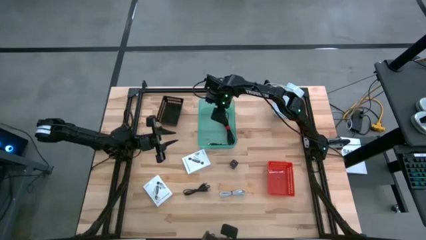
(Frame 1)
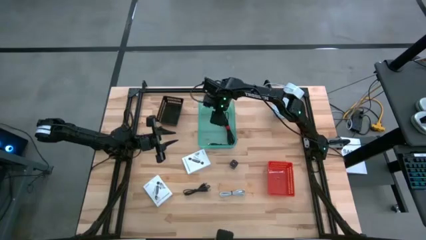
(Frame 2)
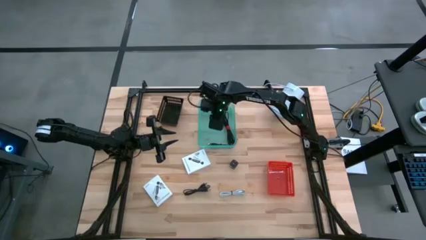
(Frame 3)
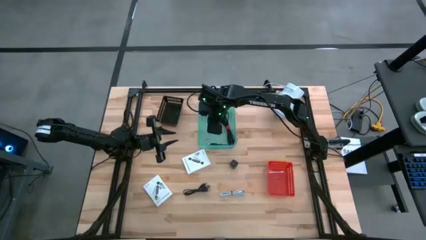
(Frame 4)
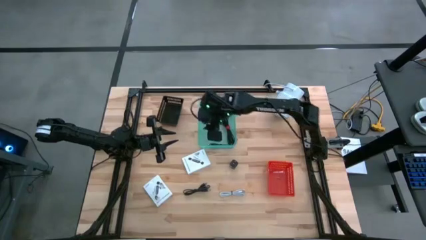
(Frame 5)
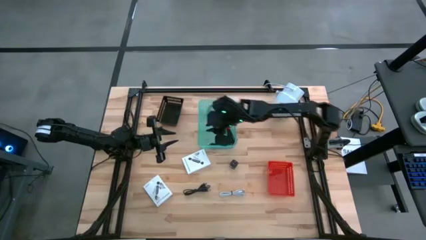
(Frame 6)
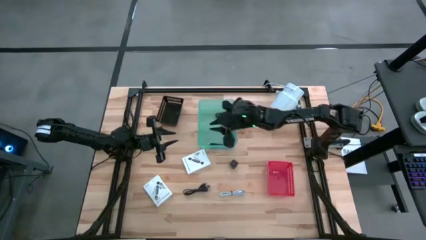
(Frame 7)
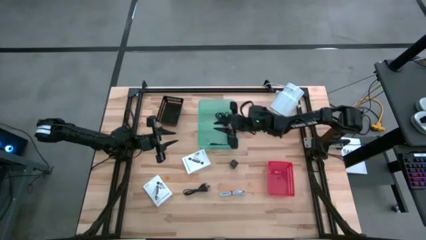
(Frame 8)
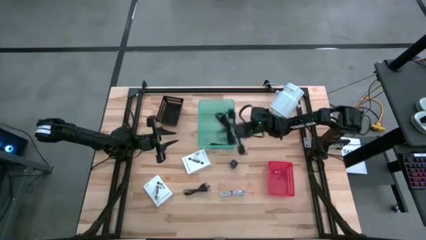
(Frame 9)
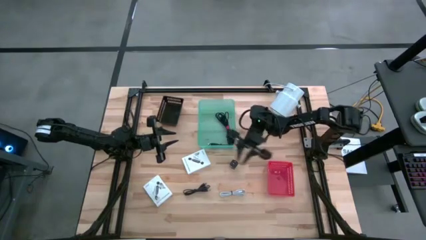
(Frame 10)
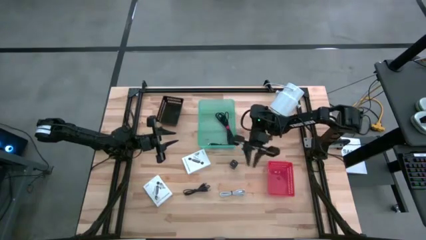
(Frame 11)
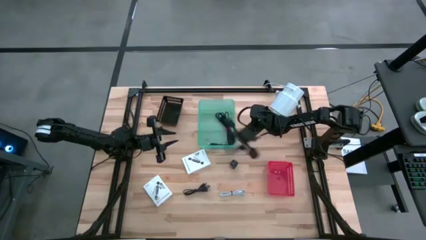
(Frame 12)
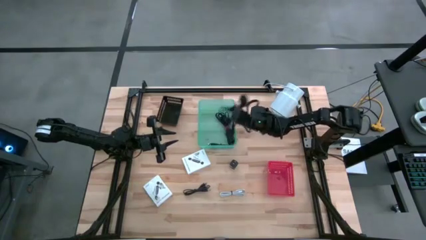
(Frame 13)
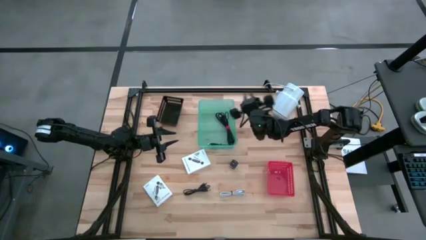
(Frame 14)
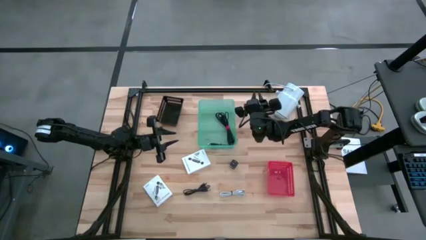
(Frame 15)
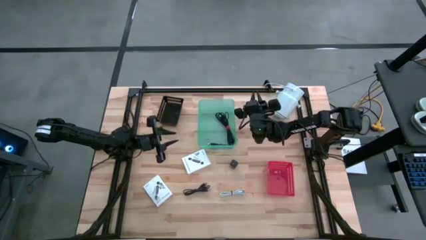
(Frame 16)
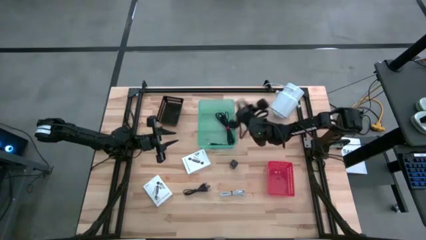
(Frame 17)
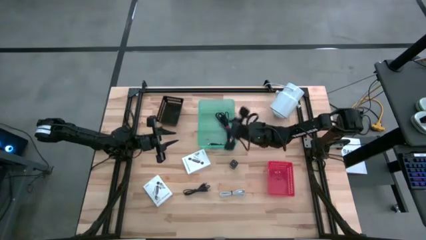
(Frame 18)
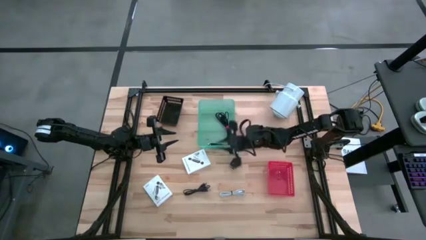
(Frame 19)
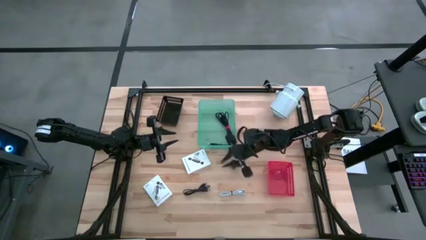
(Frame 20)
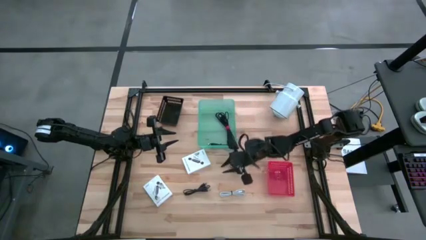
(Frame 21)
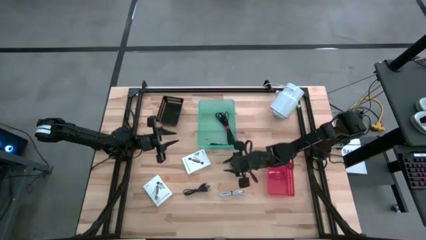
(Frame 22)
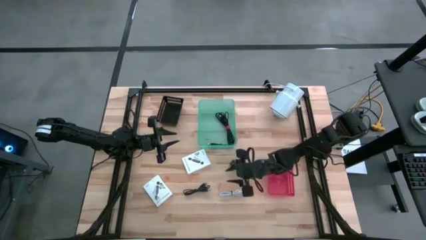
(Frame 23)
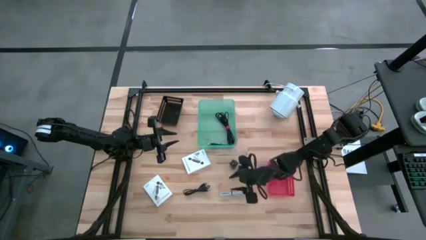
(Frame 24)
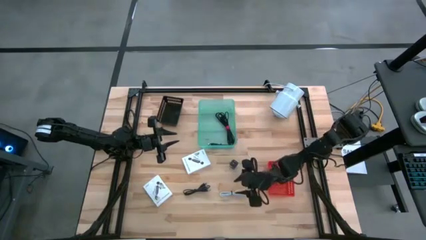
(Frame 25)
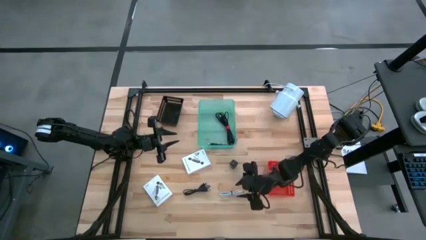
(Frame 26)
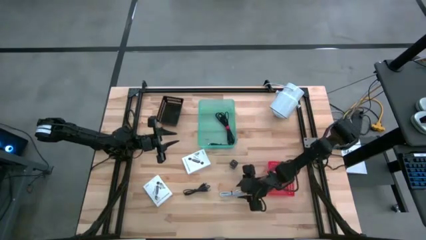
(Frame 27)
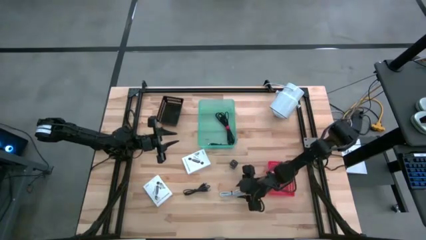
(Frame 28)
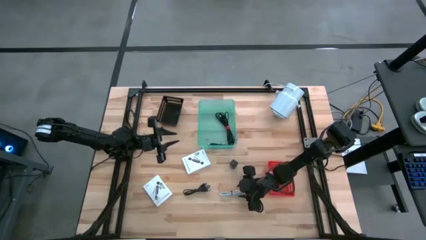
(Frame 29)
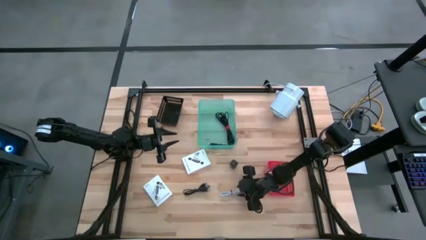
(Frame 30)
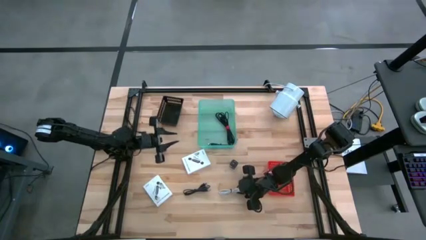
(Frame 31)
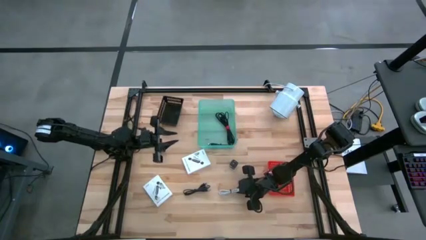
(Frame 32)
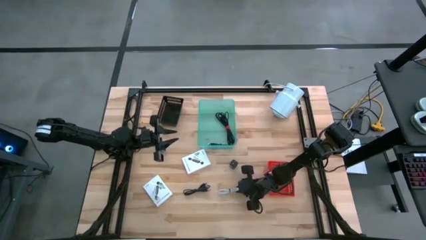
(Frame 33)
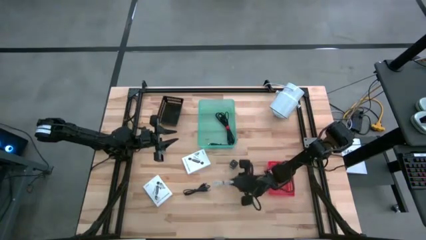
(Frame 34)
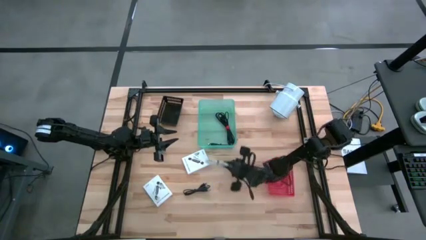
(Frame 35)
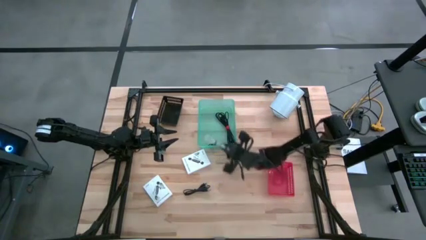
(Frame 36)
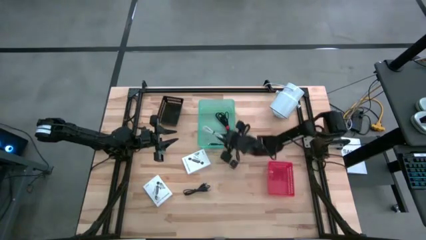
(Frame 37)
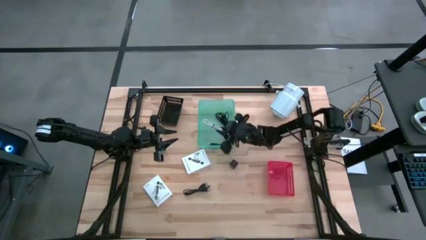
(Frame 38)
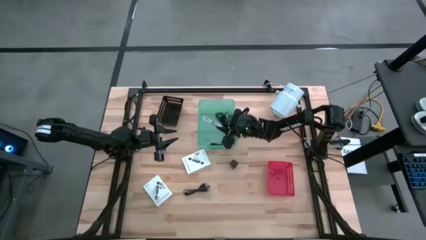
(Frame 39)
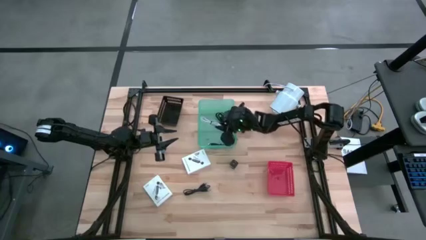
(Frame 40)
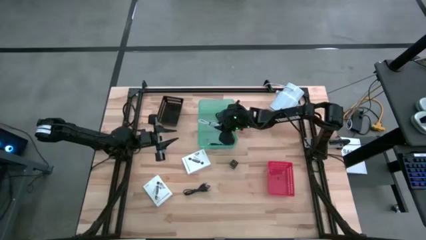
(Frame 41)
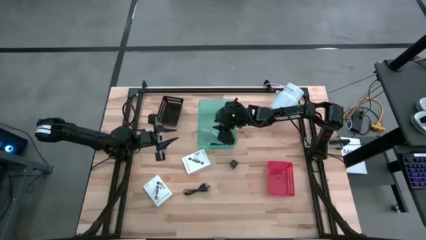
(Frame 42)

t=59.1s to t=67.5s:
Task: Pick and place items into bin
Put the white charger cable into the green bin

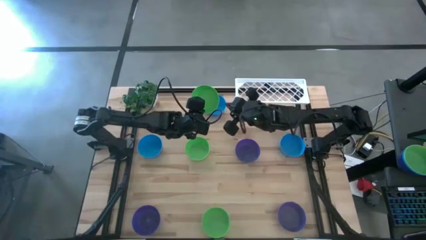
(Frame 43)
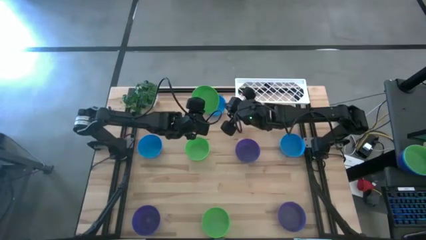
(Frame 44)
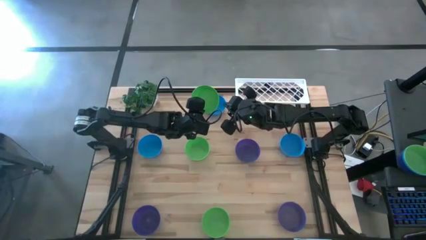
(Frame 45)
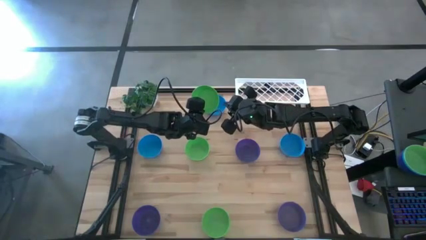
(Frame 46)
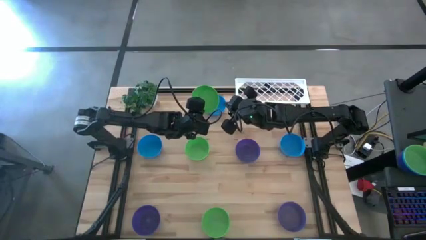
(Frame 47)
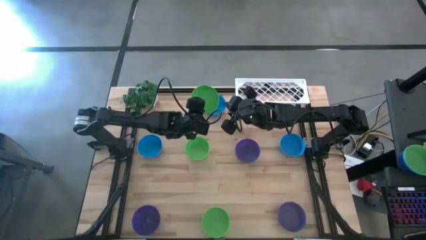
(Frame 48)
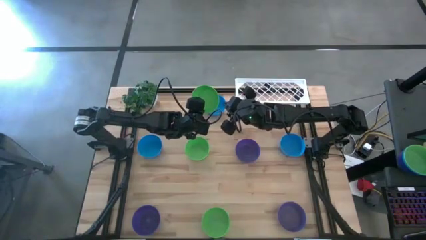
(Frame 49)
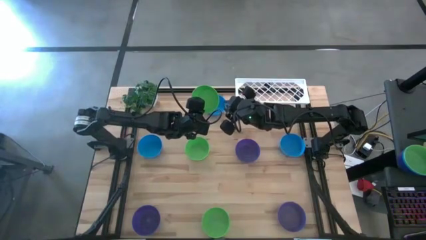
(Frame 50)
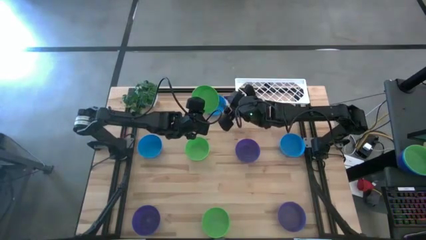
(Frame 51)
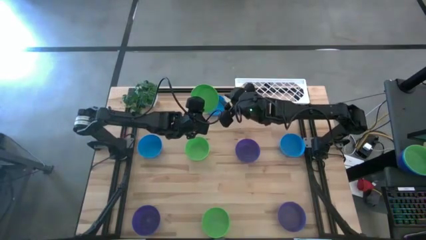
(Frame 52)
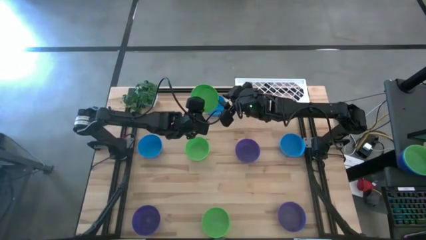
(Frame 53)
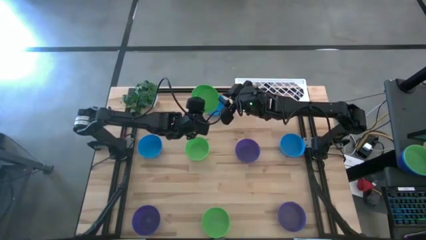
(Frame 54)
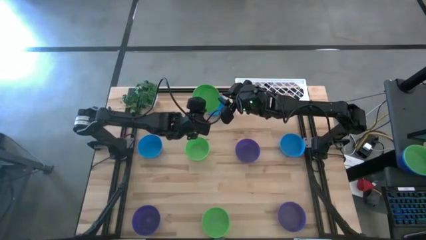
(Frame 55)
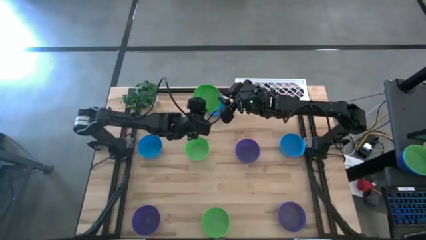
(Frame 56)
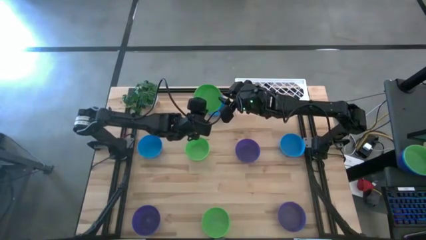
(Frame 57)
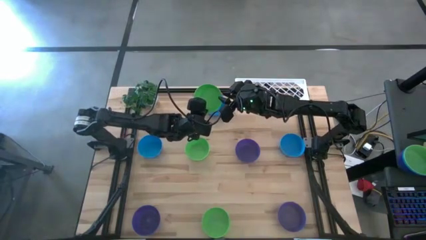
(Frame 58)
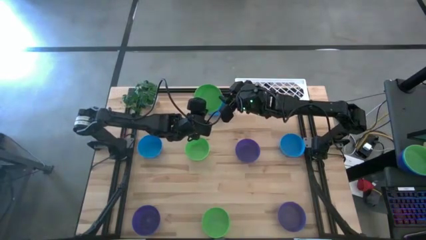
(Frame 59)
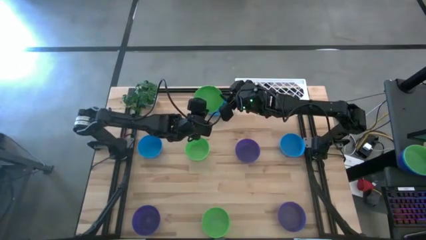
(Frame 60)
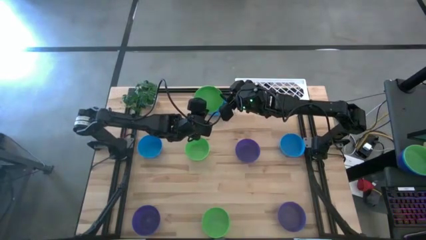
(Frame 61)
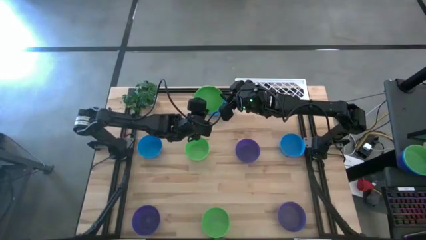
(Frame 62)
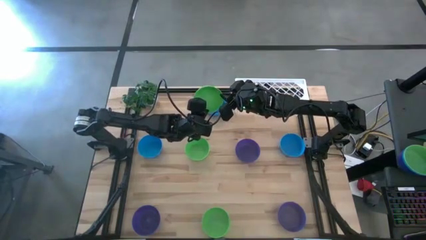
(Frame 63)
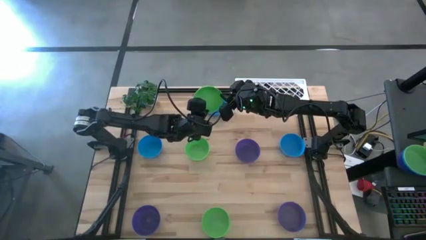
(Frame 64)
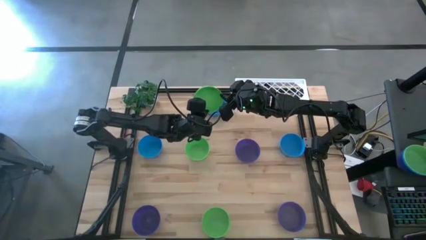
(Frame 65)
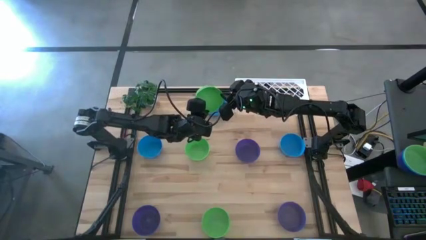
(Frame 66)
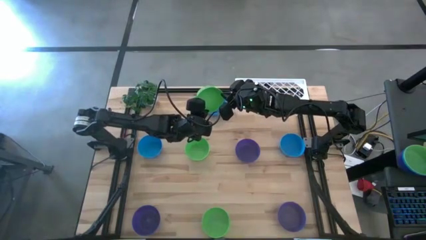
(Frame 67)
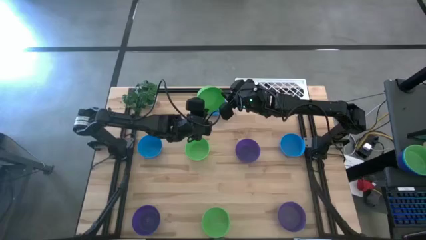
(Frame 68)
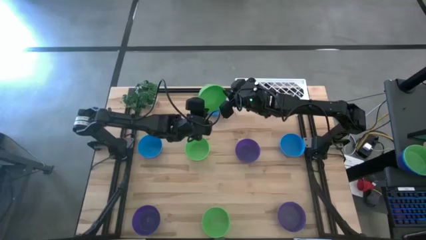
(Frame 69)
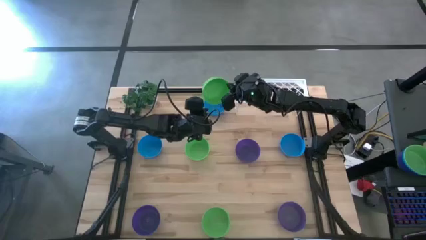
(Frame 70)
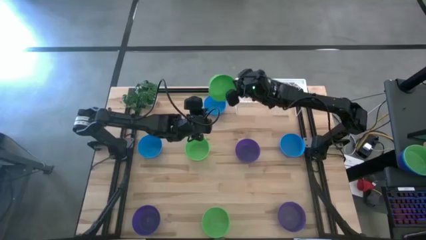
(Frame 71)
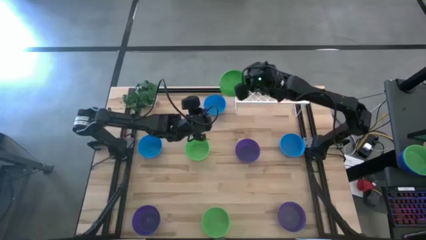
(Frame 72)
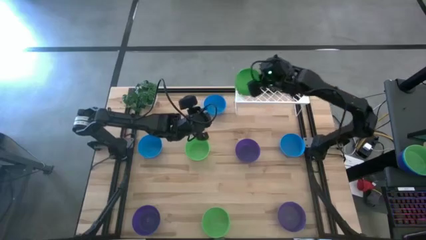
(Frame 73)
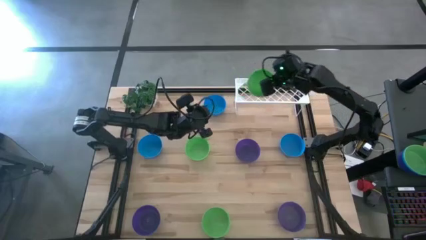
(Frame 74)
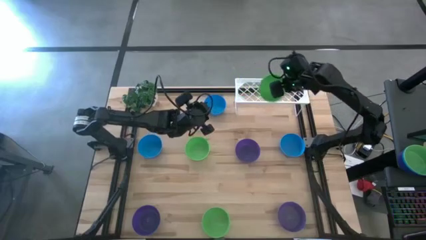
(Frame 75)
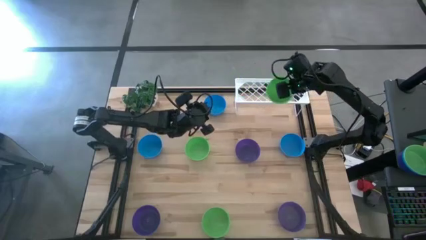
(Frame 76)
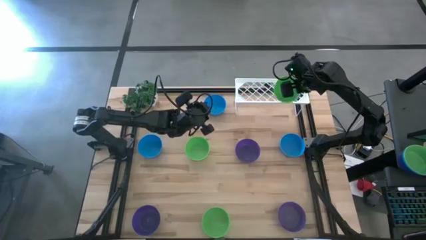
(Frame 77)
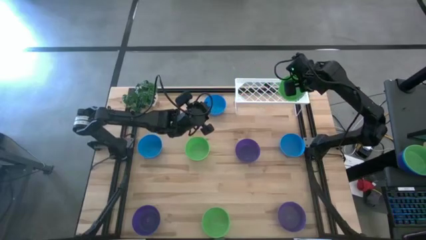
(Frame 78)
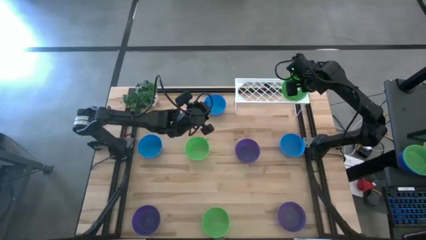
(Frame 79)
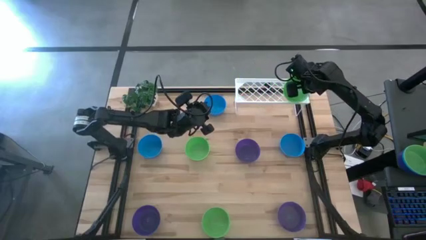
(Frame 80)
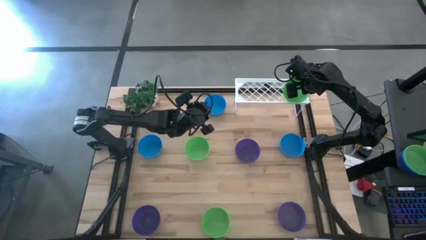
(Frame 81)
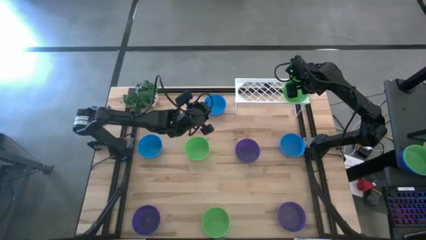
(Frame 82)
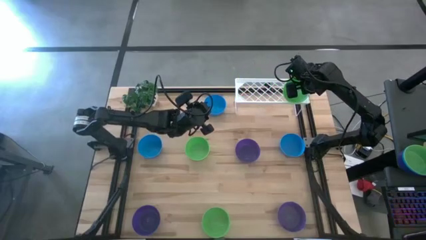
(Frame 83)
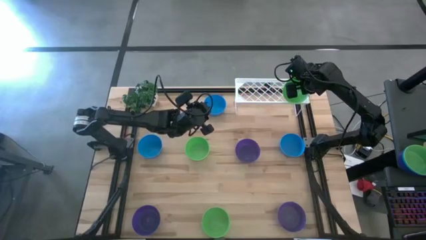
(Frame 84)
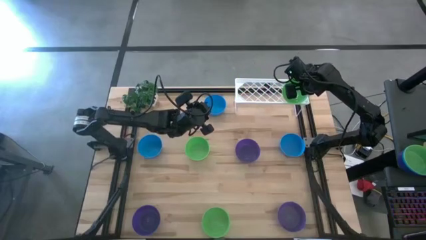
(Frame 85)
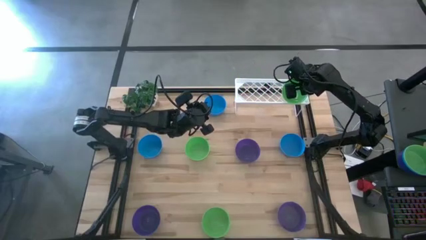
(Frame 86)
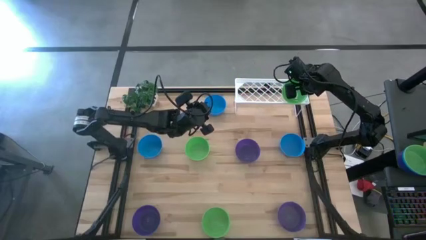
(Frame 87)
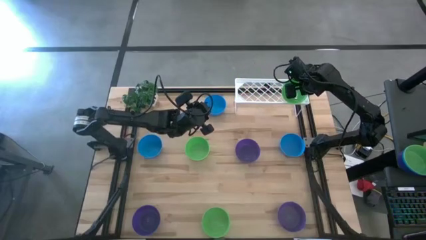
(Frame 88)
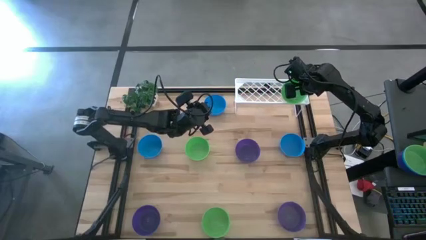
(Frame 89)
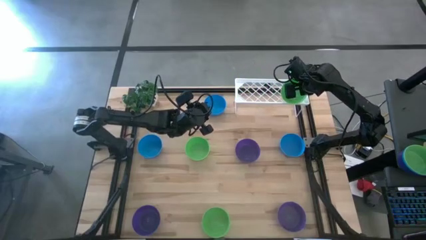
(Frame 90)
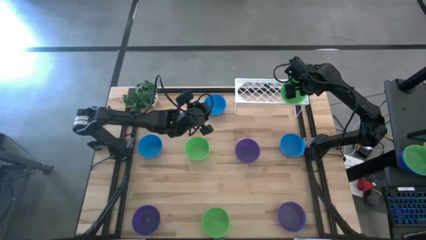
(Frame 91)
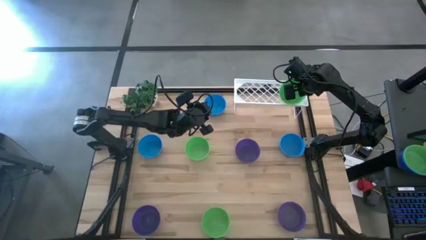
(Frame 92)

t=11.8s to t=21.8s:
Task: Pick & Place Mini bowls
Put the top green bowl on the shelf
